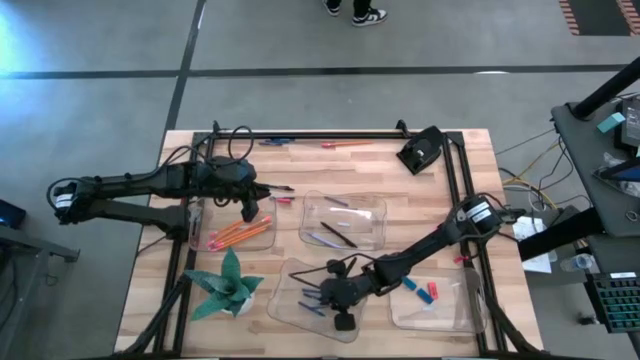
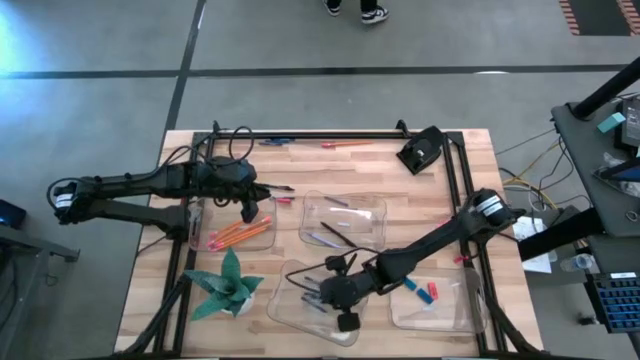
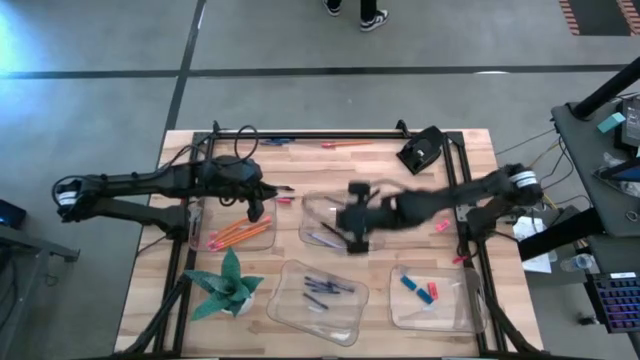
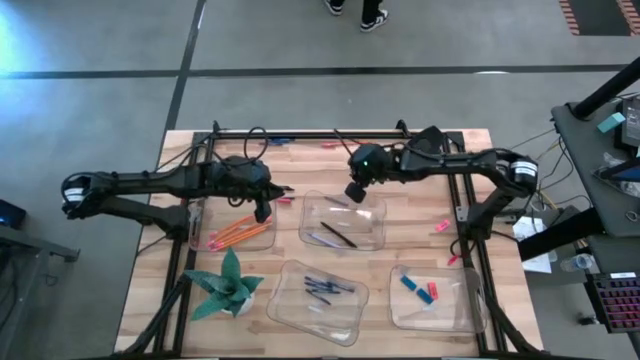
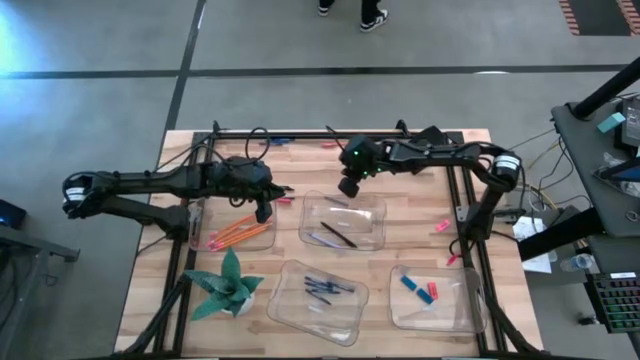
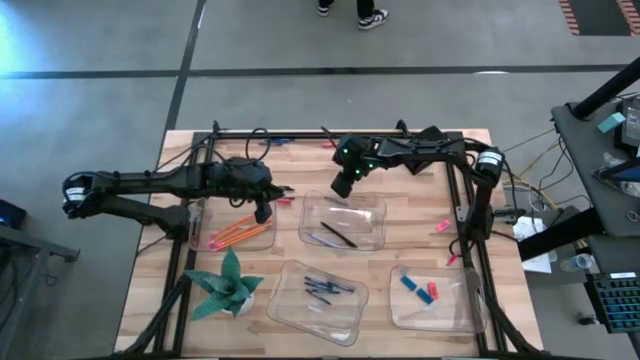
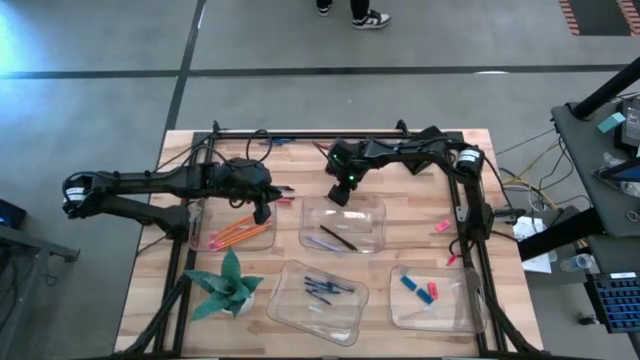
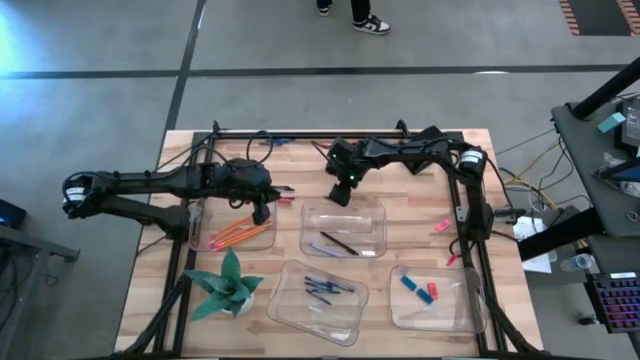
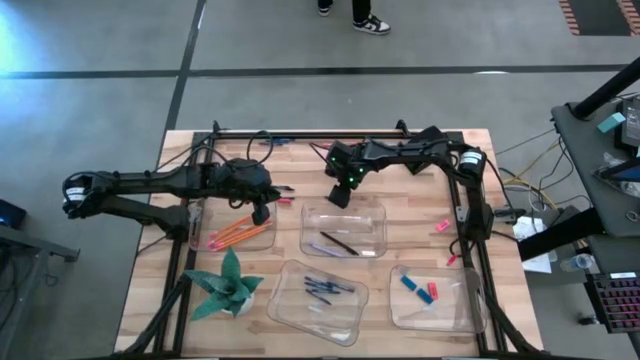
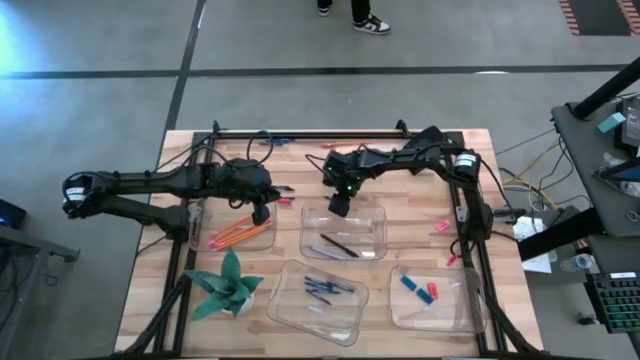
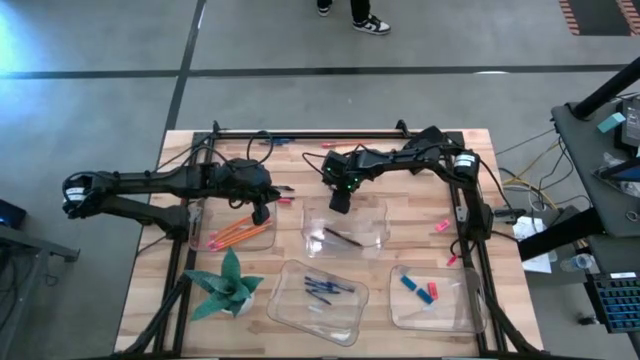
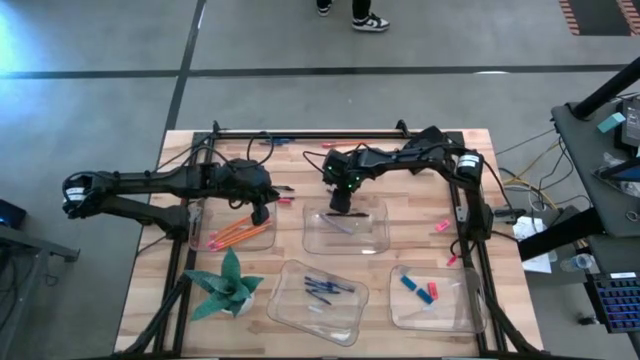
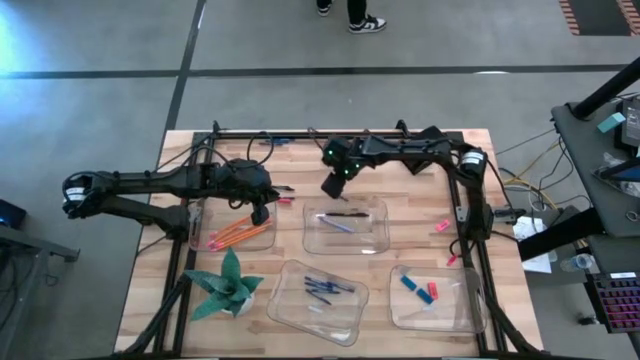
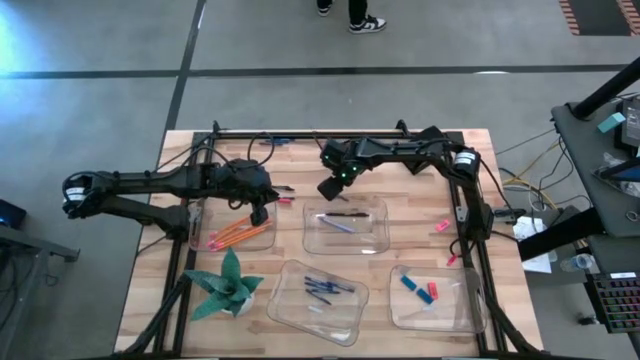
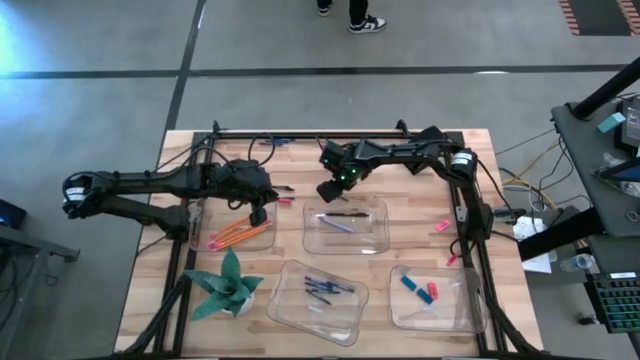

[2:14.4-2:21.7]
Task: Sort crayons/erasers/pens/pencils in bins
Put the blue crayon into the bottom left transparent bin

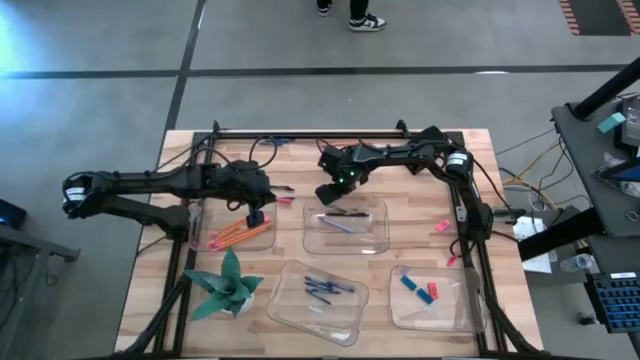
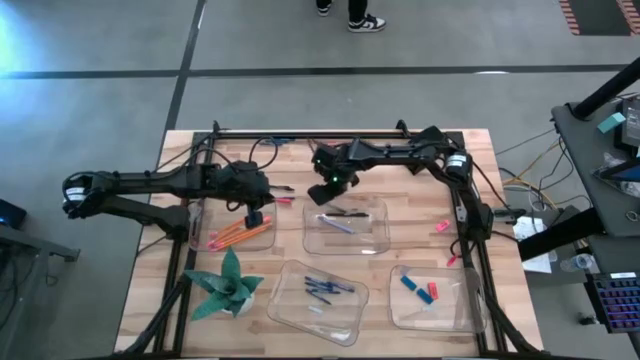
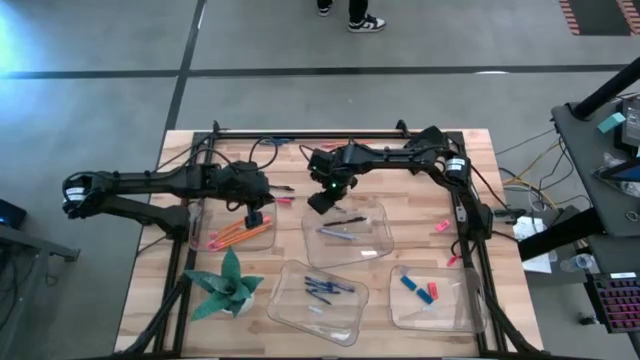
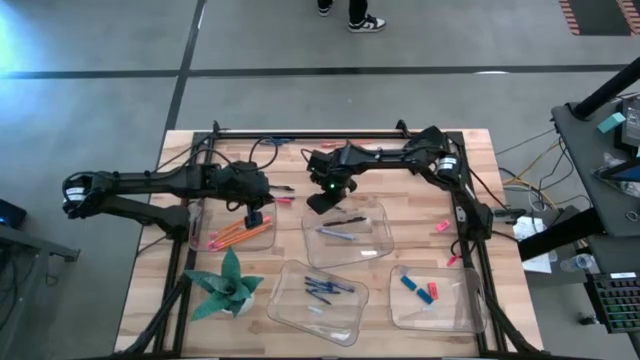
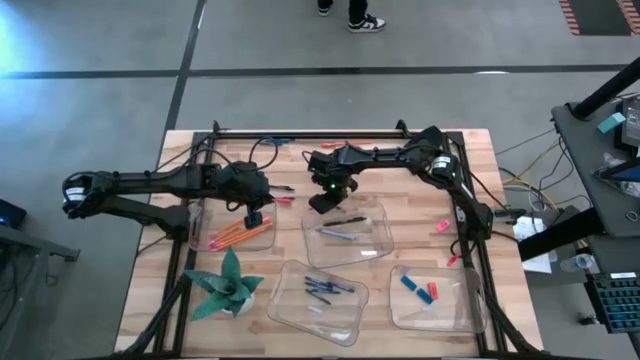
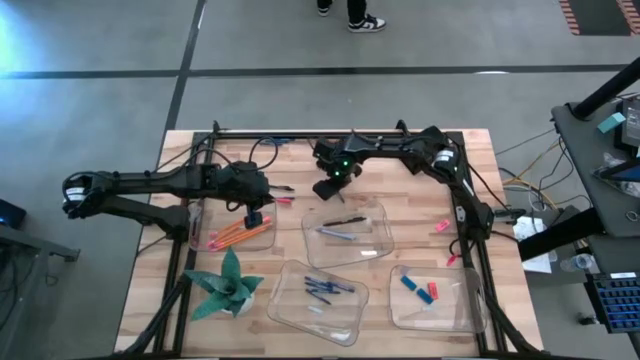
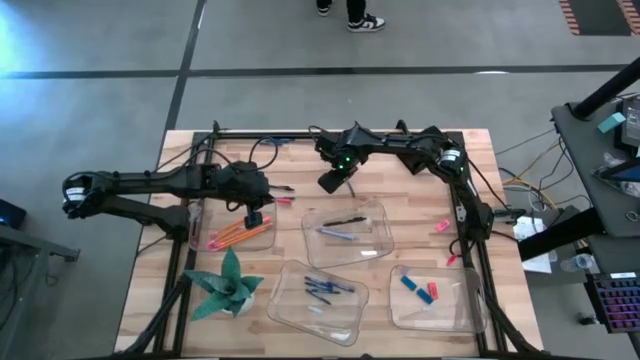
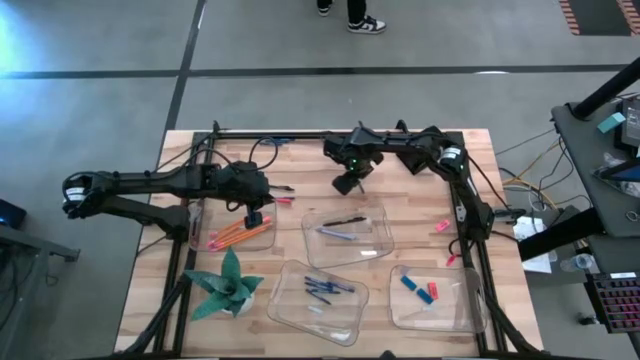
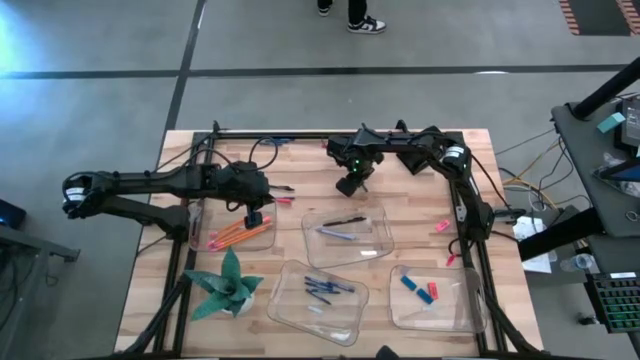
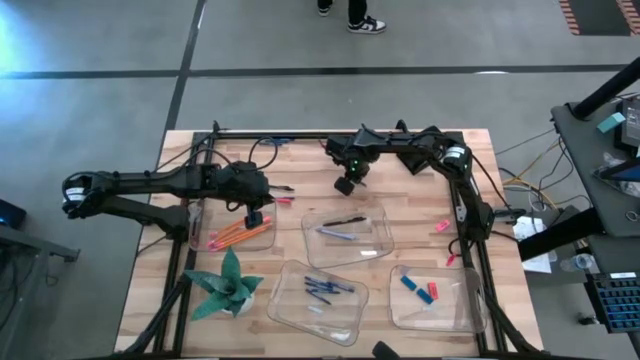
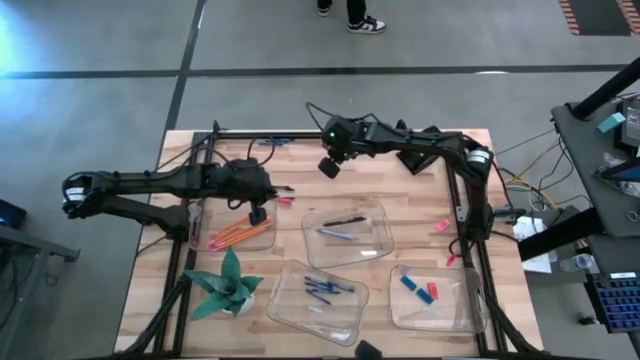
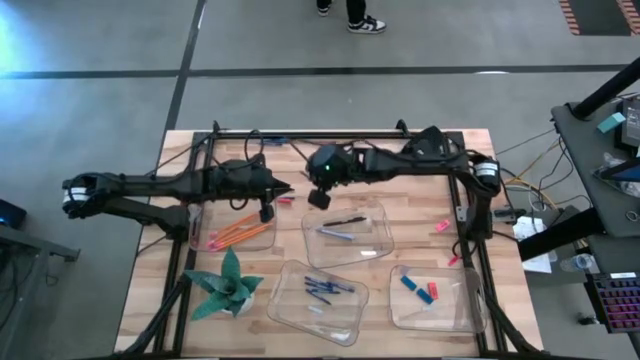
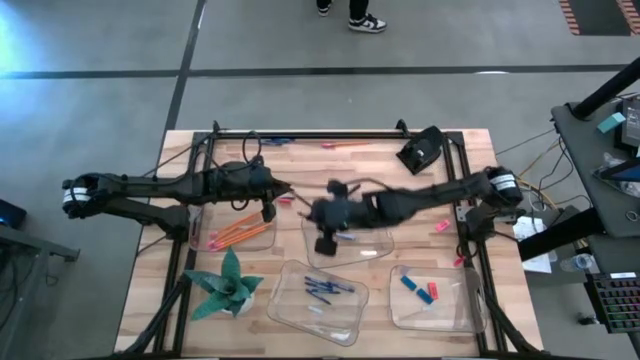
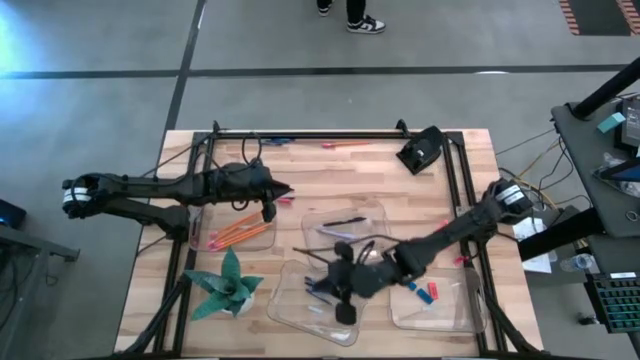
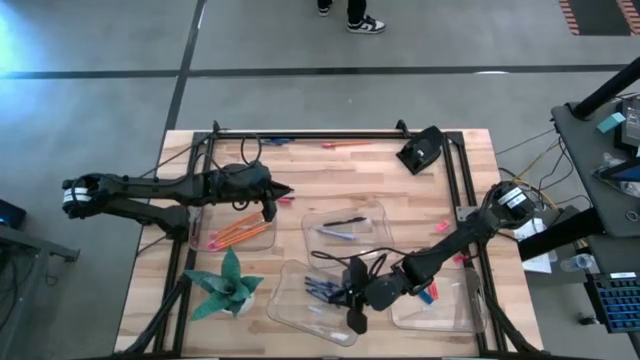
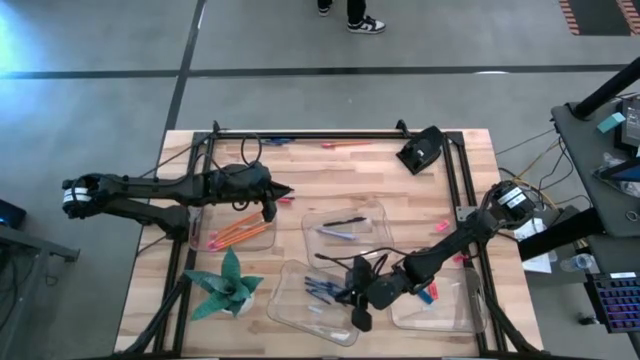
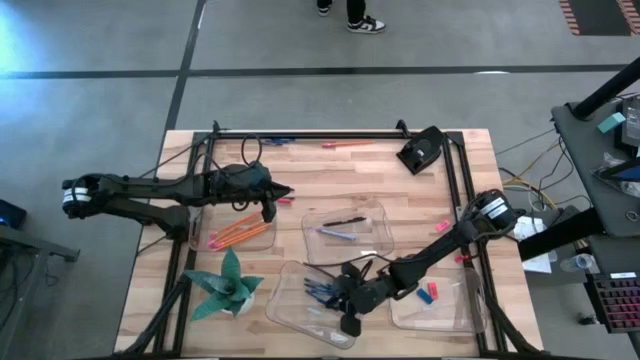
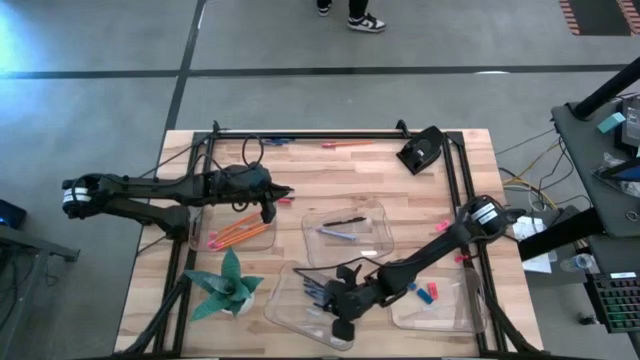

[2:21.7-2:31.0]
Put the blue crayon into the bottom left transparent bin

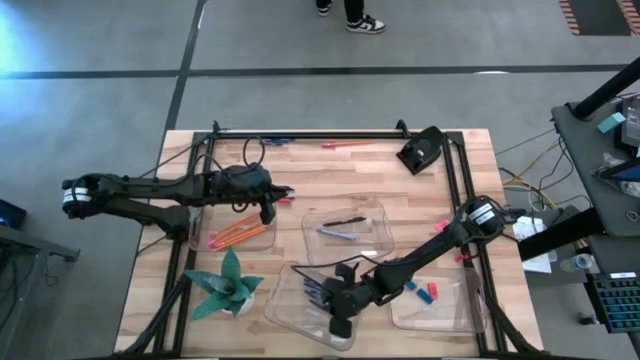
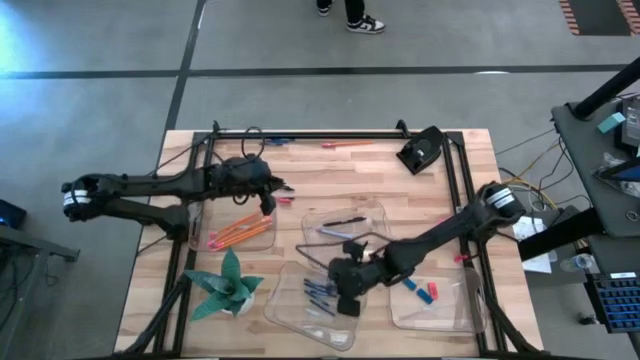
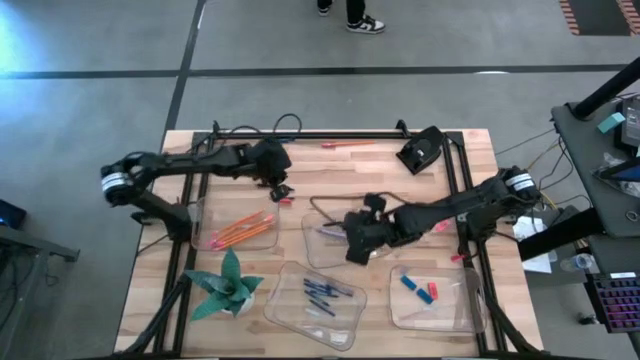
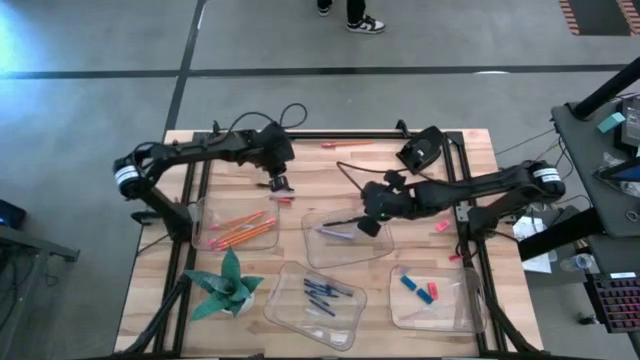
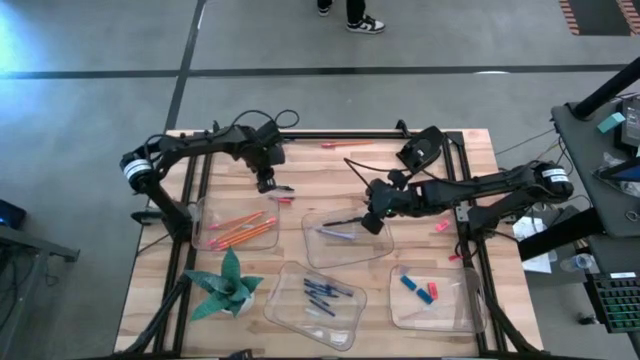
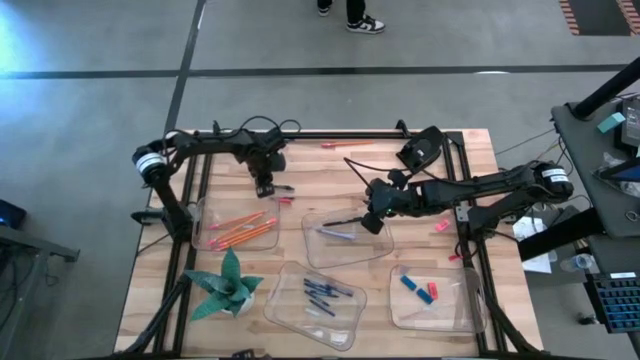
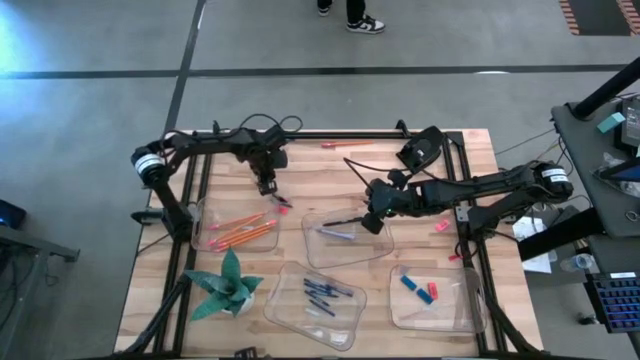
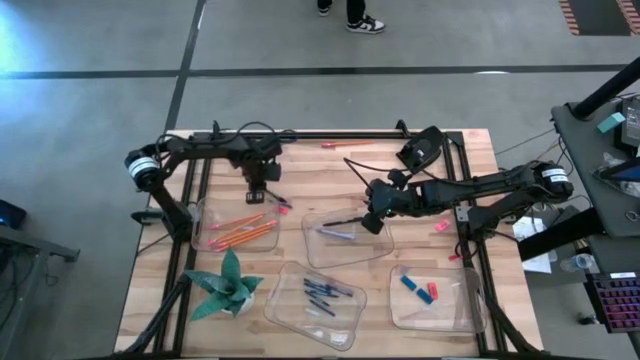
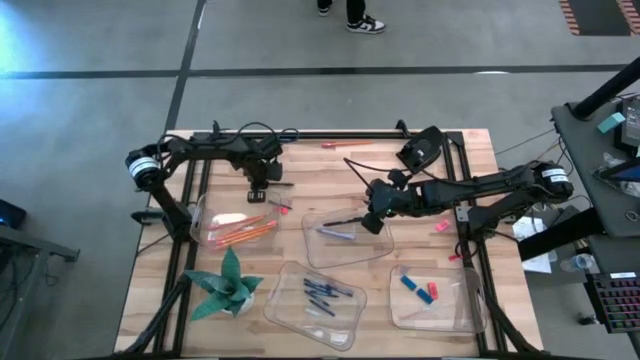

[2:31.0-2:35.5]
Put the black pen into the top right transparent bin
